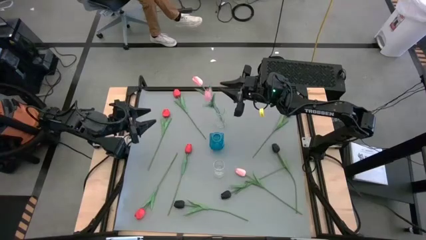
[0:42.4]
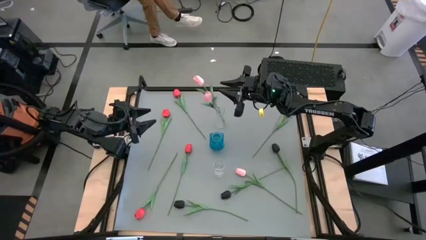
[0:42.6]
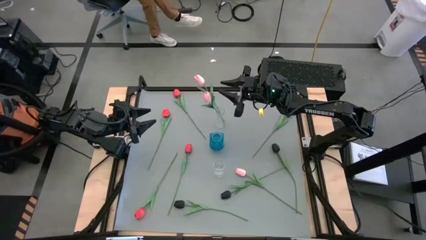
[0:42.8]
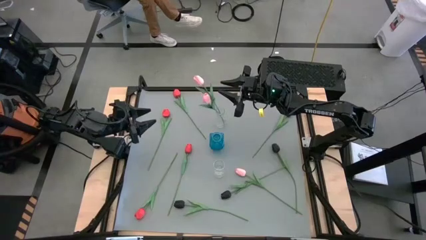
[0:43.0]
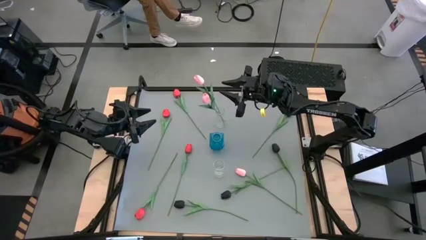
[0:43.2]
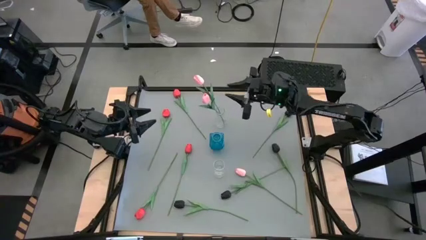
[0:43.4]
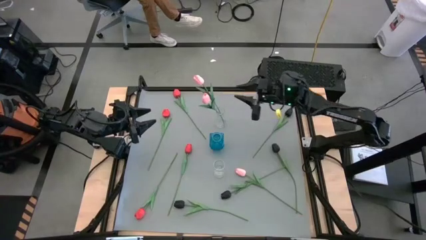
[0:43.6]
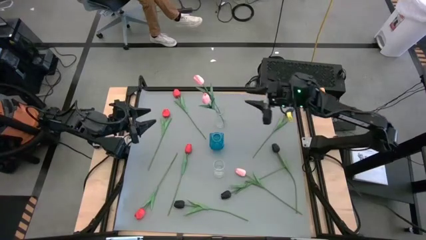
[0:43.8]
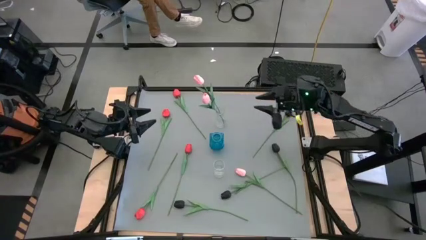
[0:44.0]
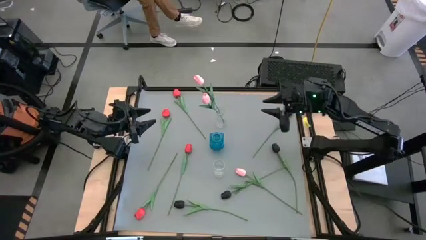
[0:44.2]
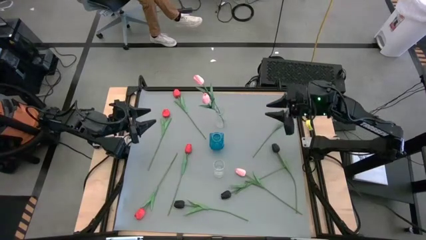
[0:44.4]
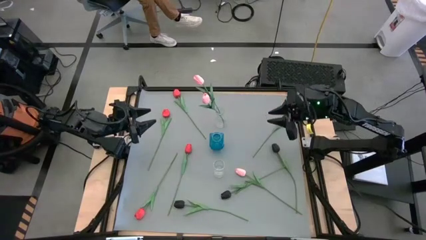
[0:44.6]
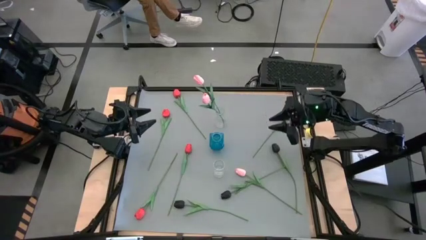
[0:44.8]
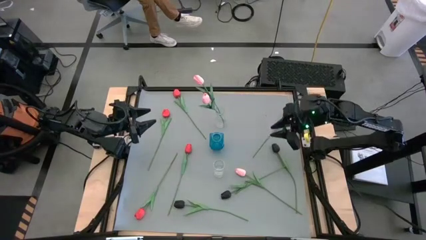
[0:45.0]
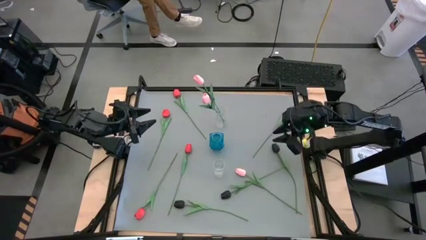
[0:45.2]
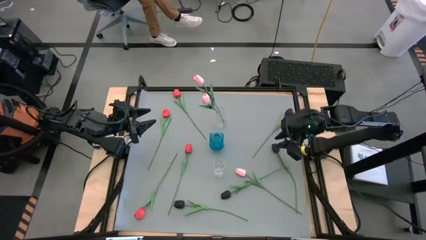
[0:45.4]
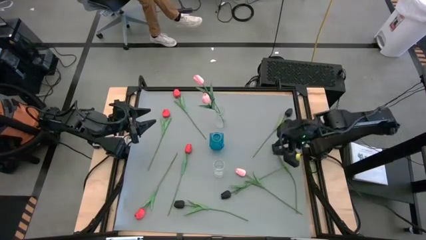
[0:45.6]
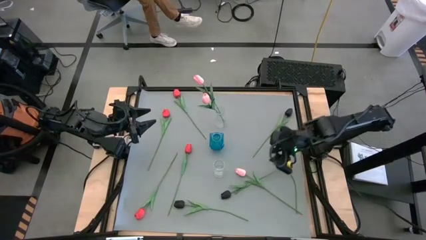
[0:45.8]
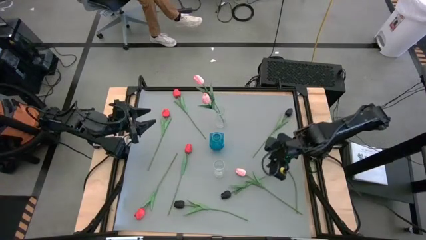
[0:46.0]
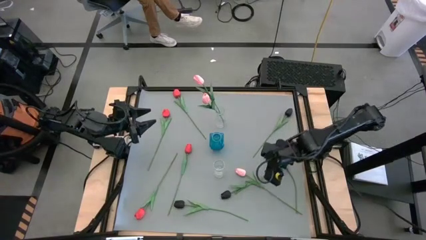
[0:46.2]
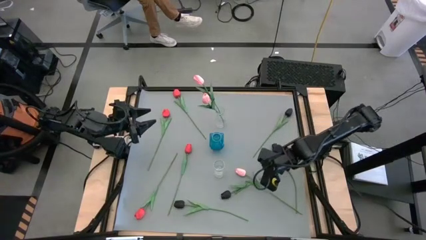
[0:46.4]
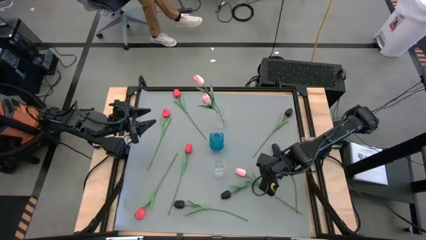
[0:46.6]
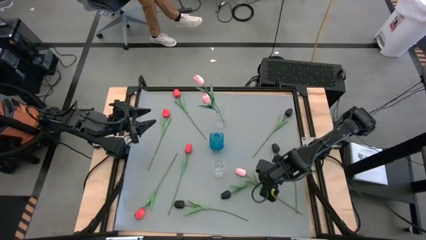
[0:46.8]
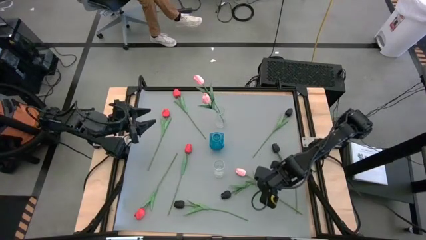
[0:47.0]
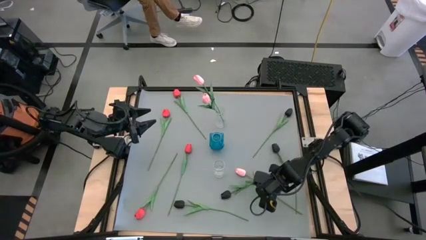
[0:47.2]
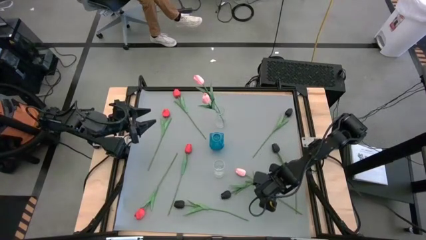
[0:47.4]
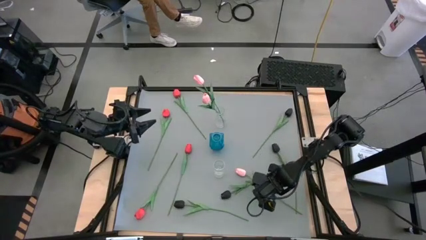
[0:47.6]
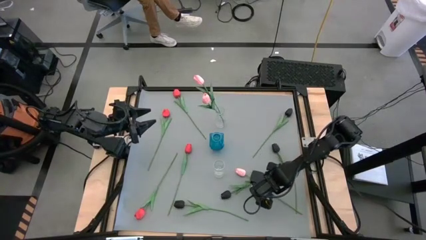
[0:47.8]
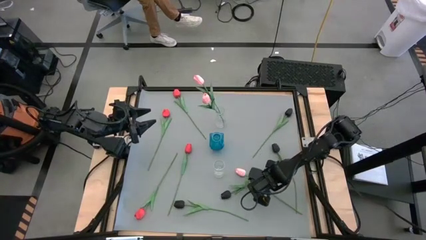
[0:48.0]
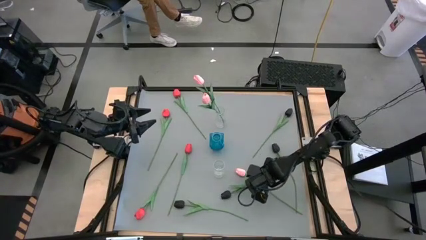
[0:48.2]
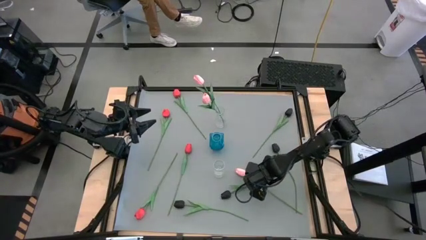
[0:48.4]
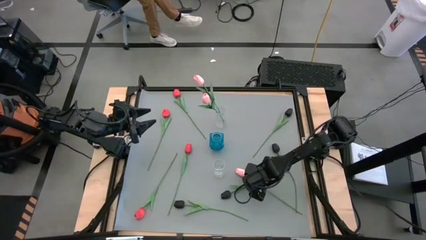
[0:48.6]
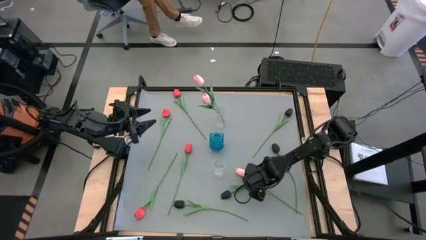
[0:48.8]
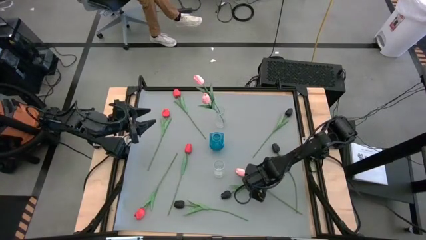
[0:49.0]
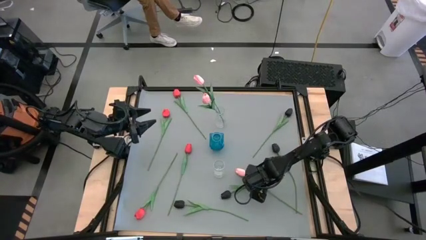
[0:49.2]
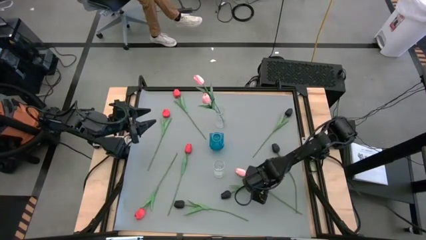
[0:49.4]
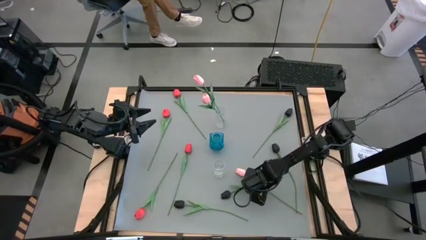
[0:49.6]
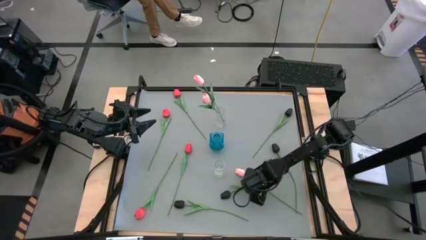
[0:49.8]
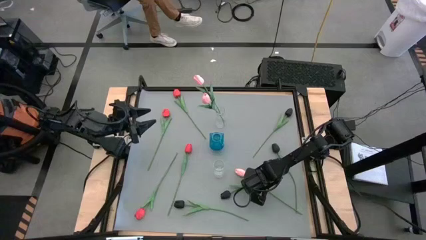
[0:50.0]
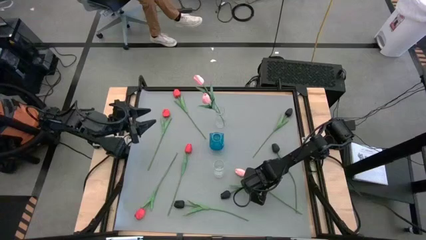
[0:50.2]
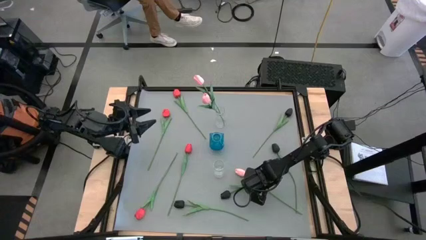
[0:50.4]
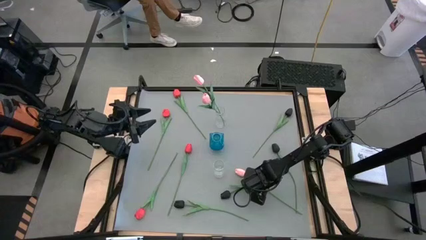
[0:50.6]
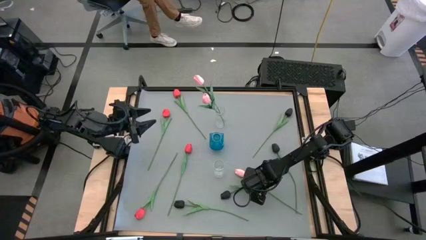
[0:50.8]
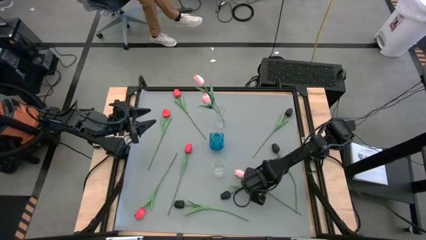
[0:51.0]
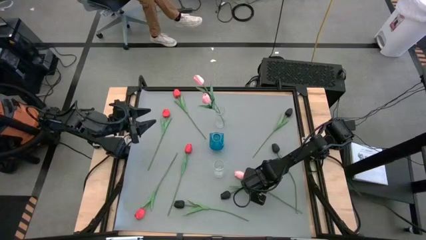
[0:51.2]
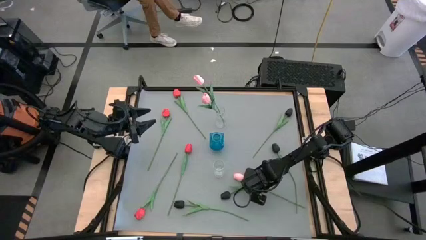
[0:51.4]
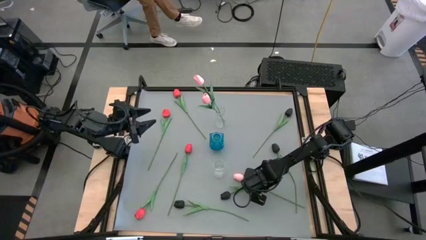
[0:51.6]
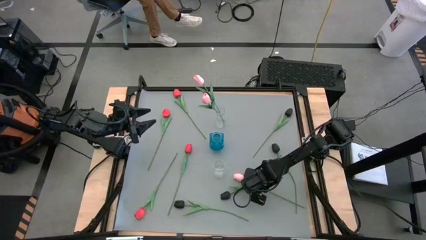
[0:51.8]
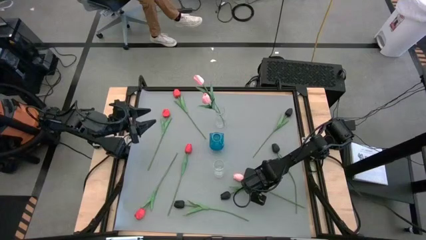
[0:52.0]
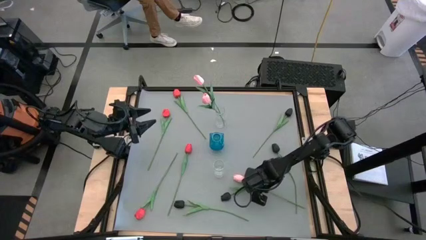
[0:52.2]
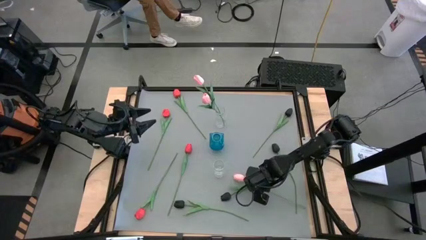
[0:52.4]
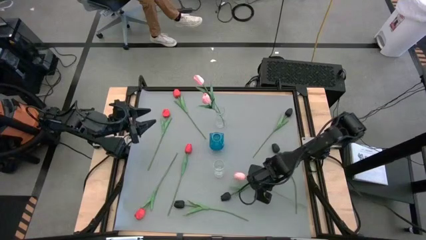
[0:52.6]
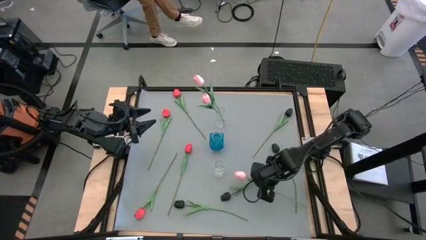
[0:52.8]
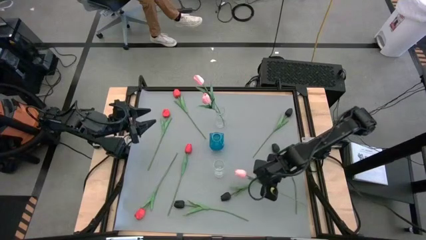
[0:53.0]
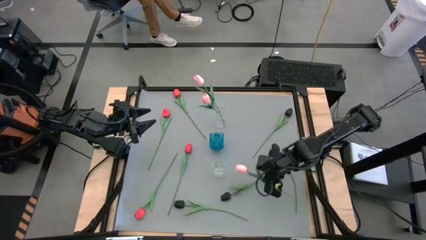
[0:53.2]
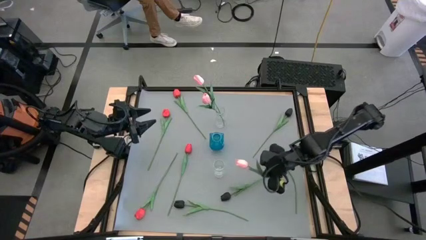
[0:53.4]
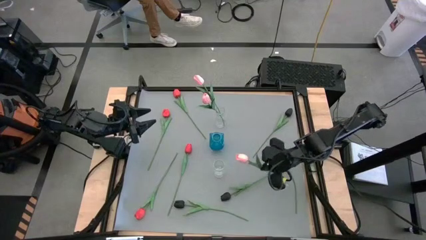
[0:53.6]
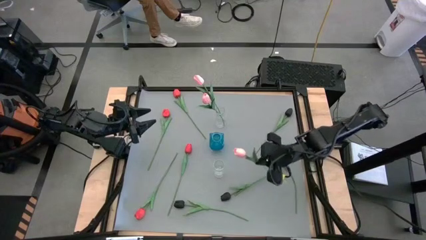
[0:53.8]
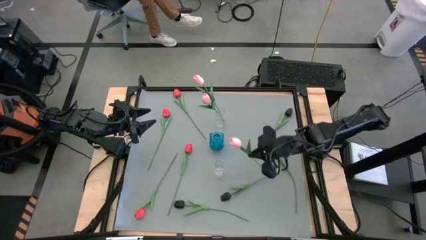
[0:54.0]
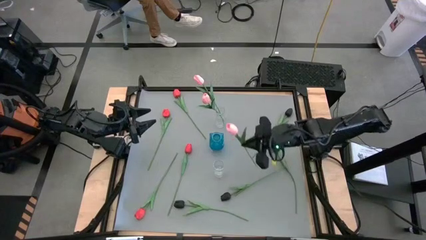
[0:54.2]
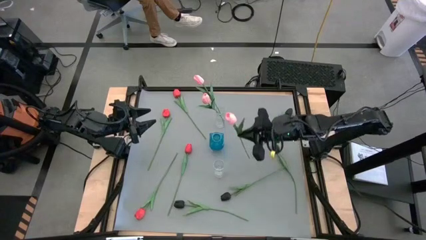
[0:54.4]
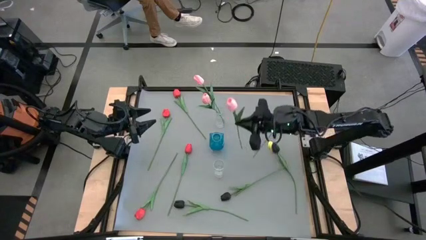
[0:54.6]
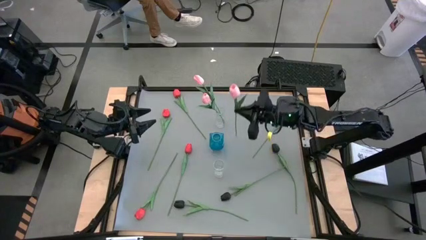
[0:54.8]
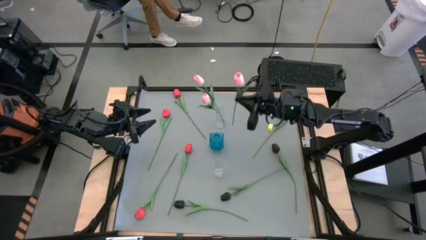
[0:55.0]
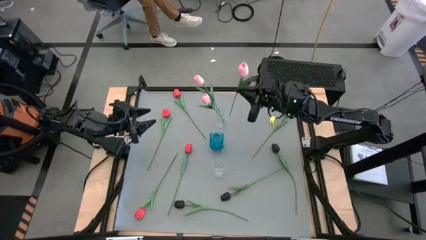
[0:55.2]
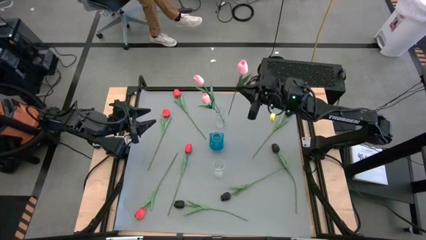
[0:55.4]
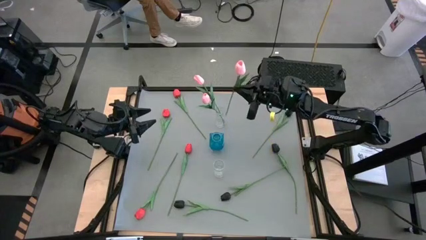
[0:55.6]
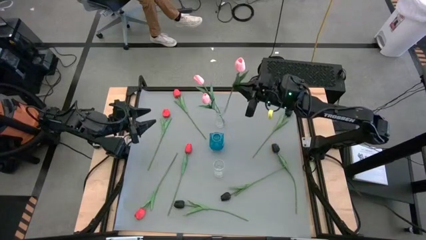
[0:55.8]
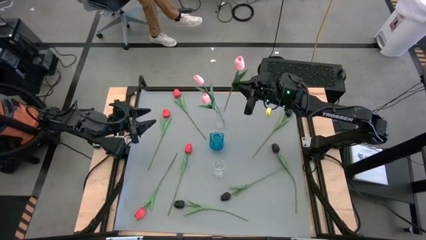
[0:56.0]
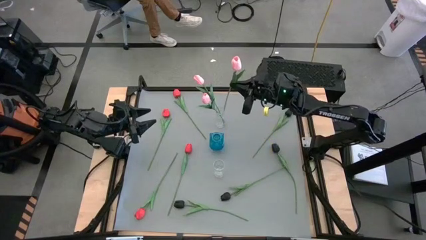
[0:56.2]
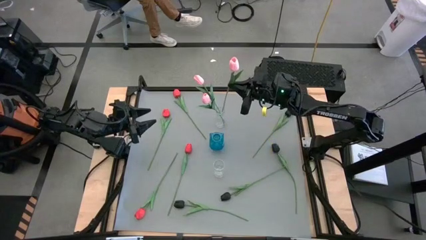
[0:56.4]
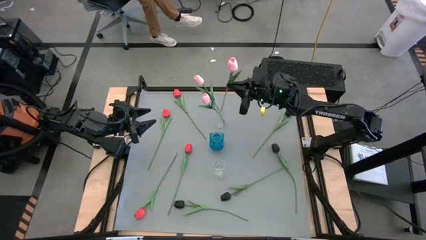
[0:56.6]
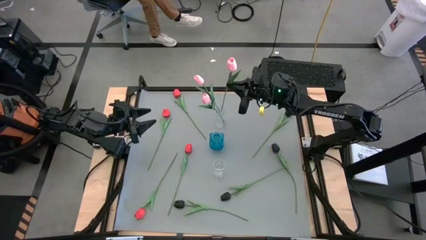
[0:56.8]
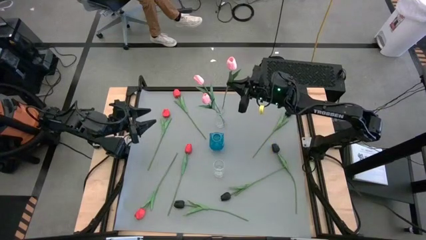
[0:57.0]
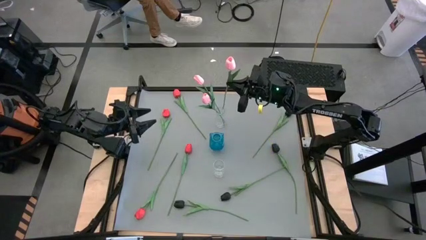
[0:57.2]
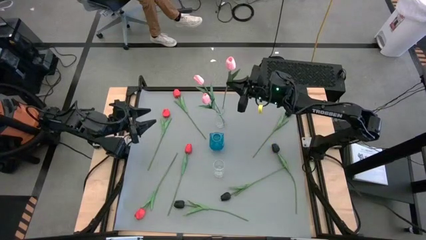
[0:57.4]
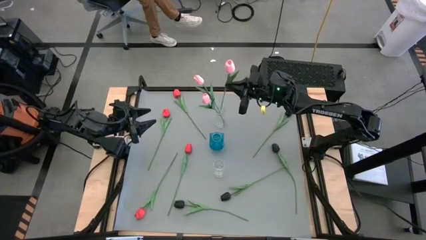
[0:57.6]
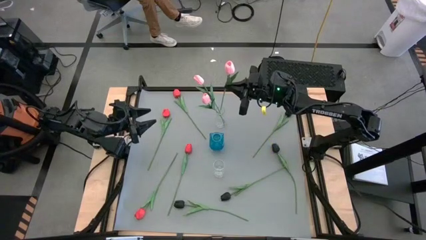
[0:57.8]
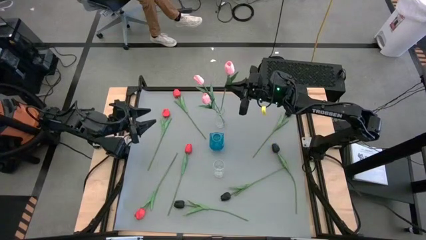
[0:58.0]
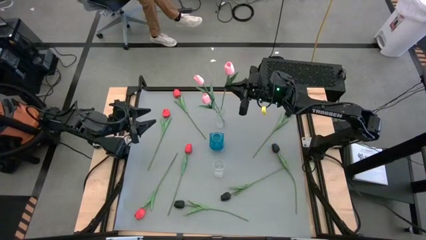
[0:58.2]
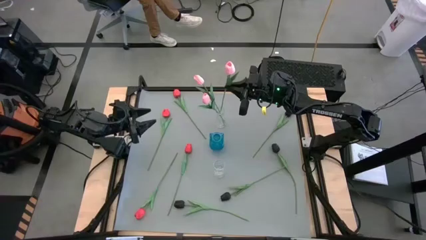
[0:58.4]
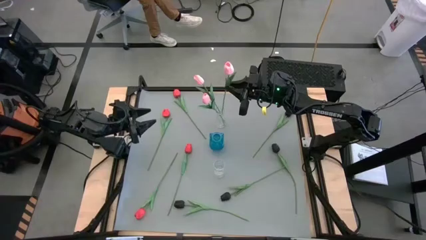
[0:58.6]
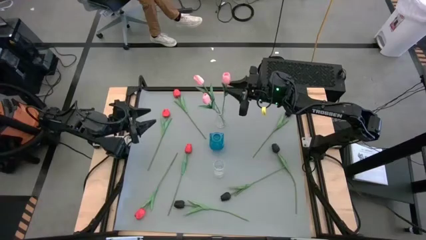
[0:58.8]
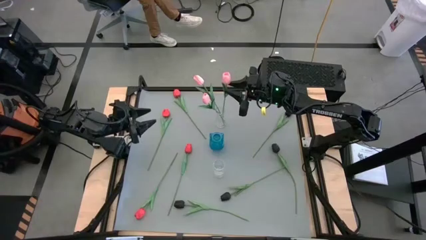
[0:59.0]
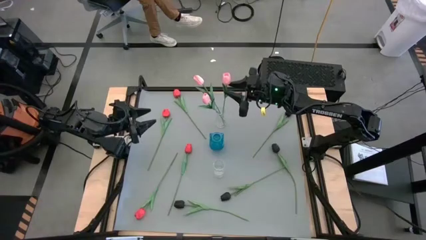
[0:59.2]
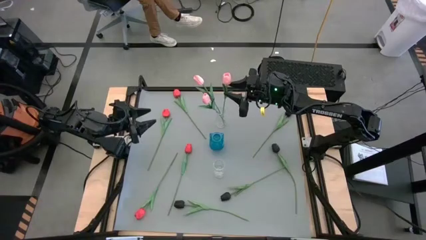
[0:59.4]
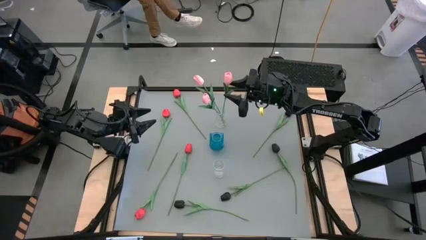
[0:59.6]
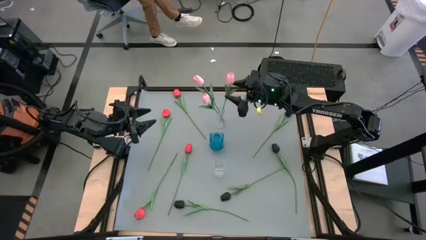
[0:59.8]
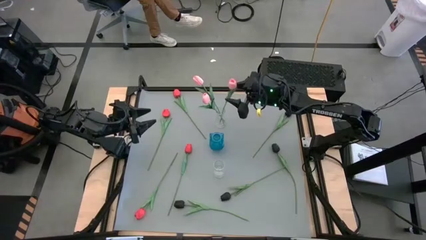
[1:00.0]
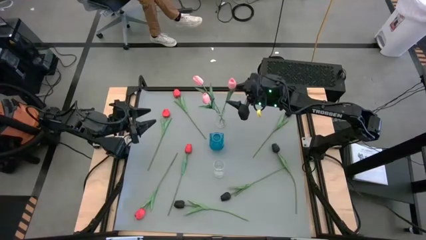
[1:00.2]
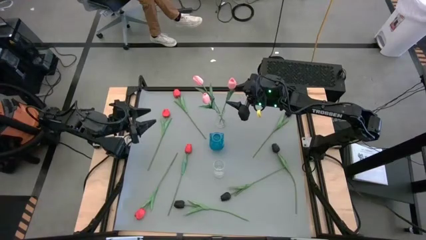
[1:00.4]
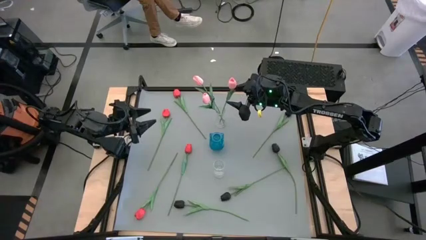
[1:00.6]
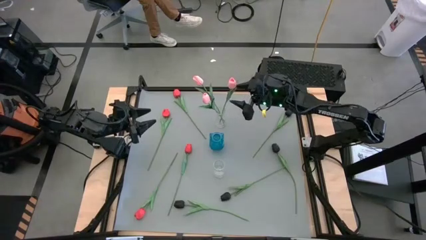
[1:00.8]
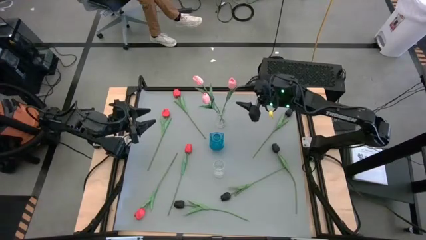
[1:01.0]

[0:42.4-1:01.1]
Task: Sort flowers into vase by color
Put the pink tulip into the top transparent vase
